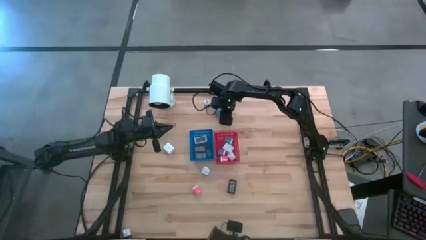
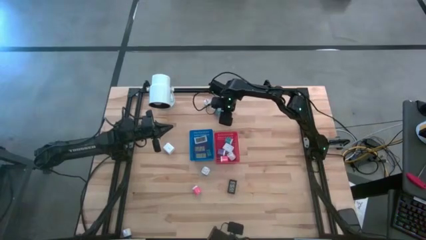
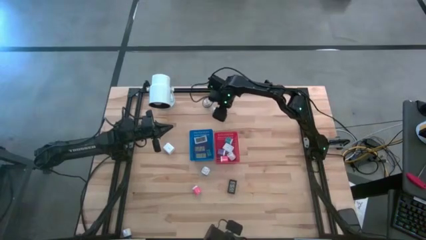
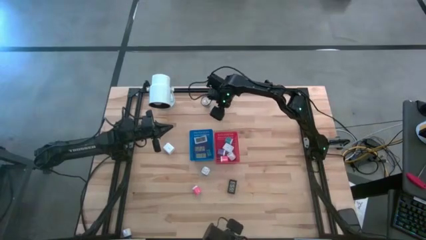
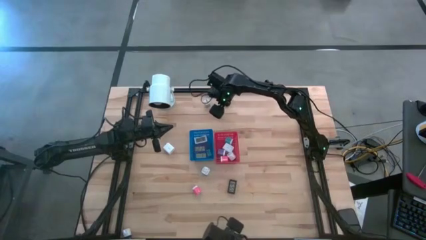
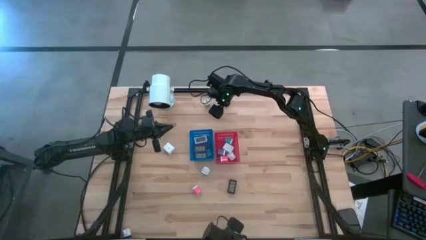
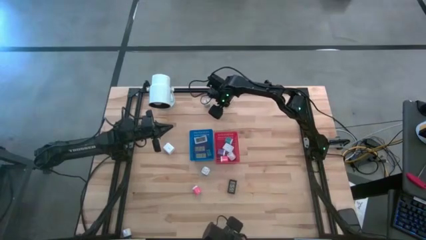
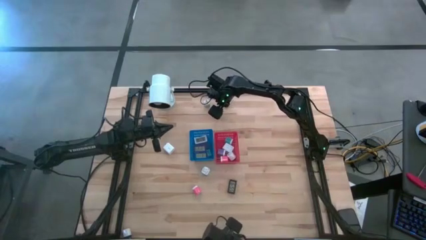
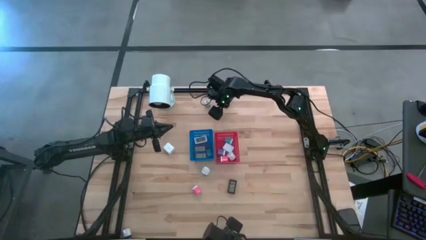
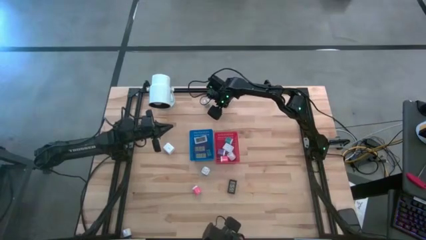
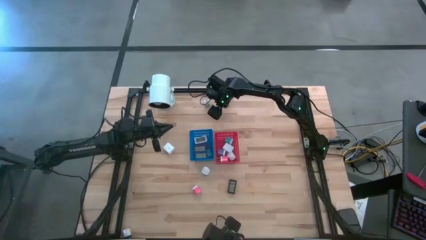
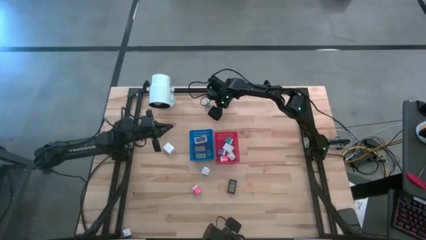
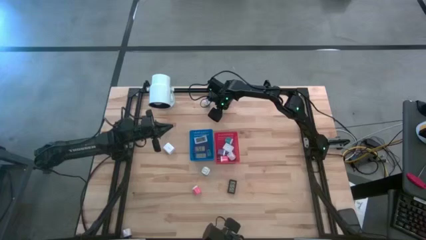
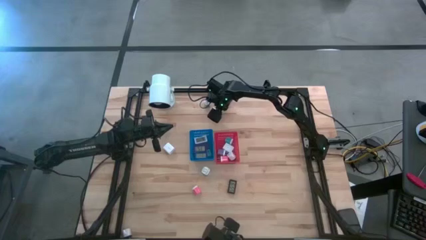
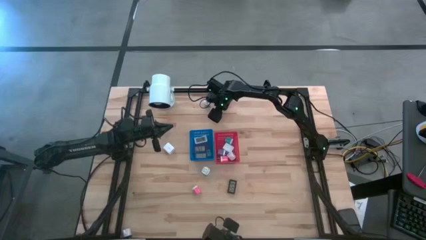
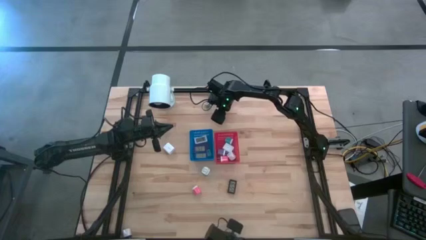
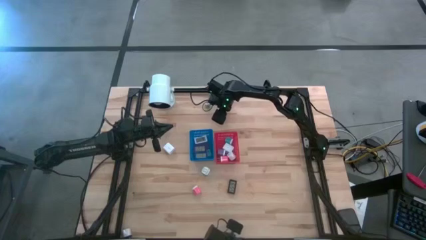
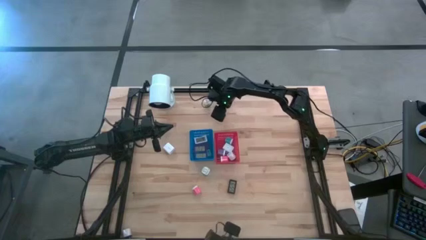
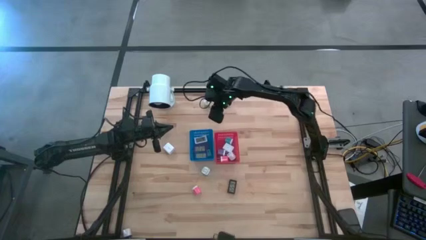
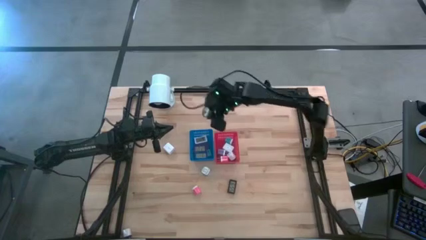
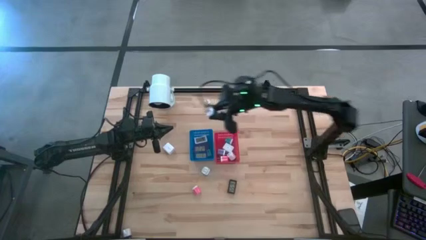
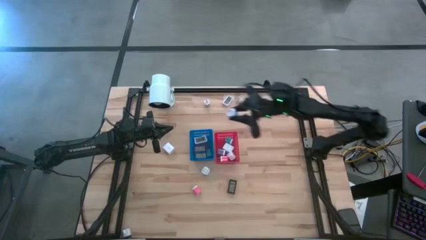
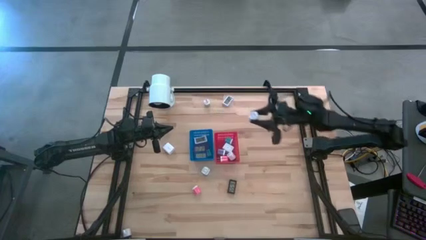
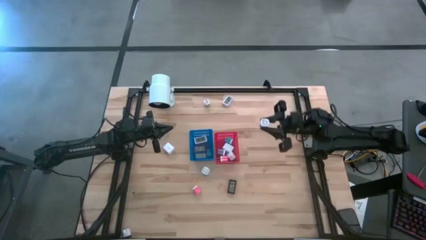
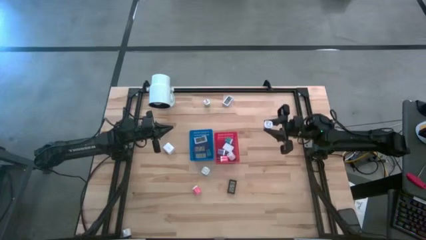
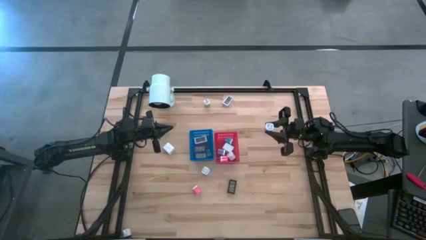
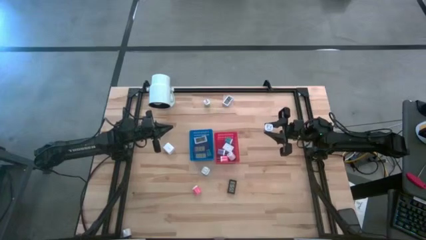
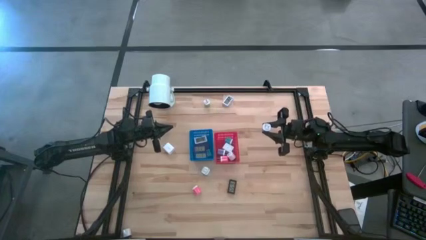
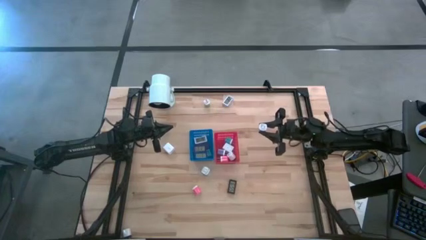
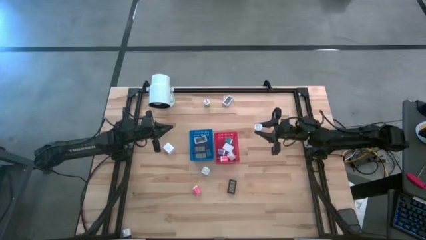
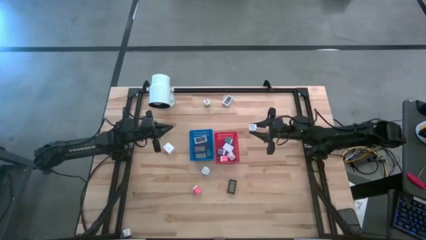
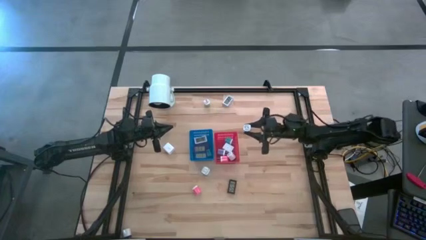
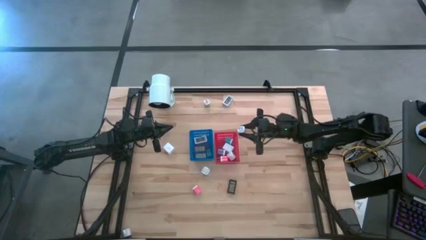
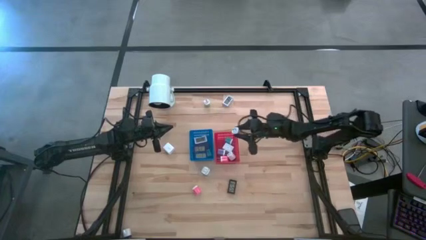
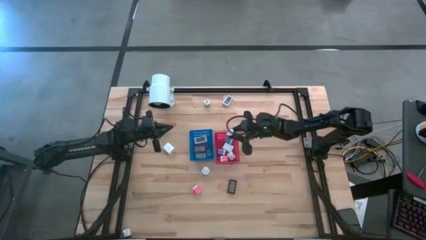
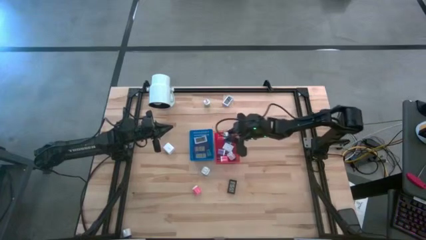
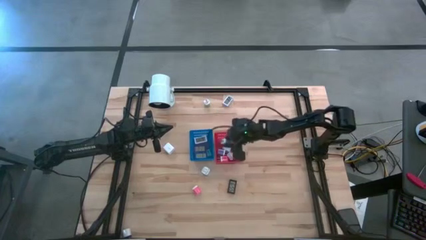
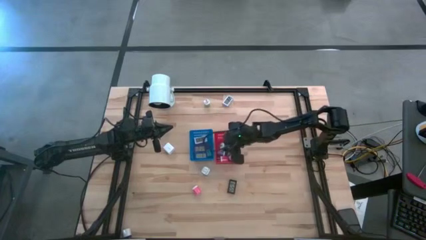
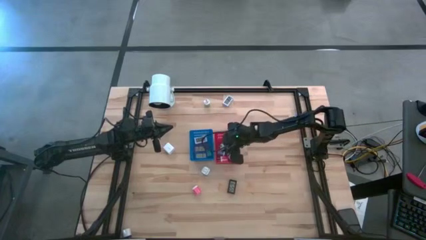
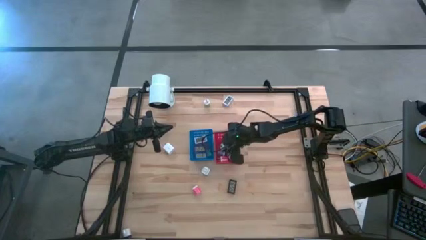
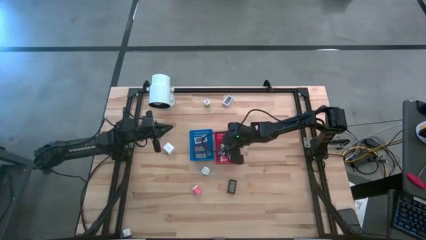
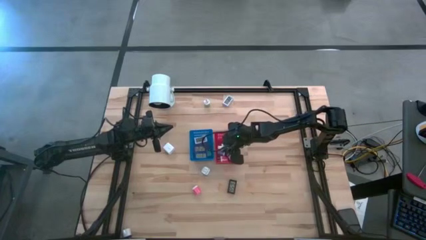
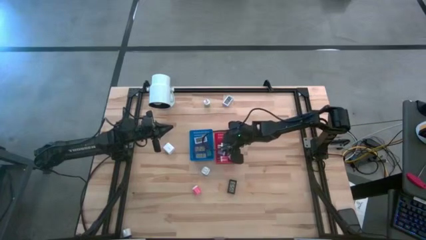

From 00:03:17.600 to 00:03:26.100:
Task: Pick & Place Office items
Put the blue charger adapter into the red bin

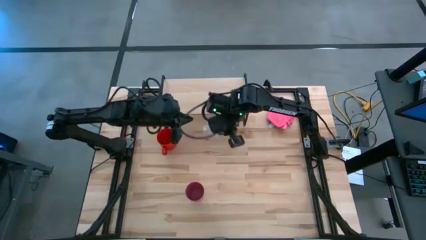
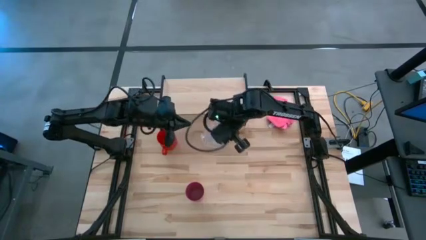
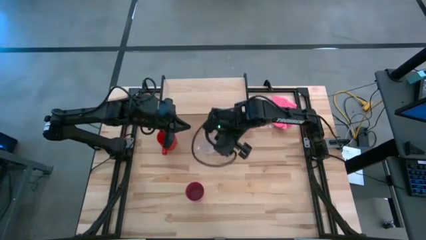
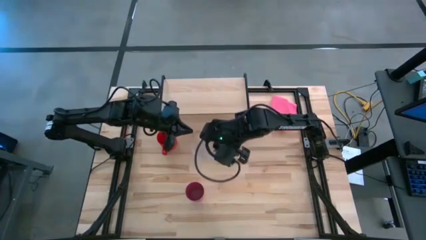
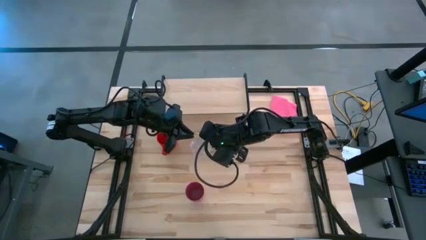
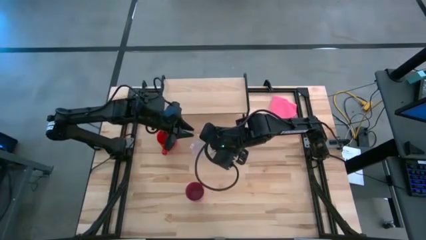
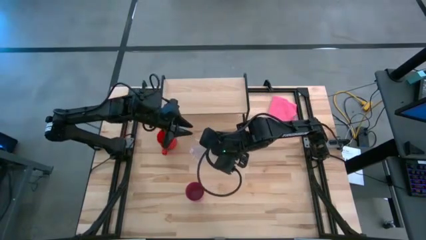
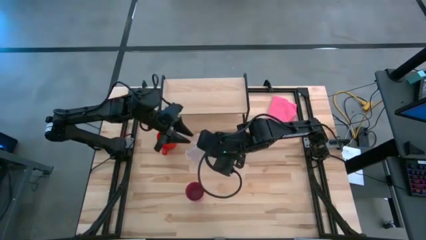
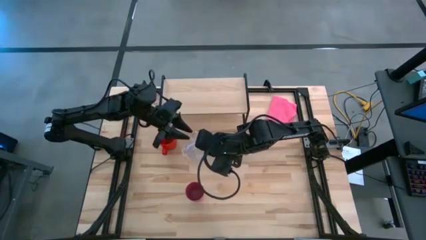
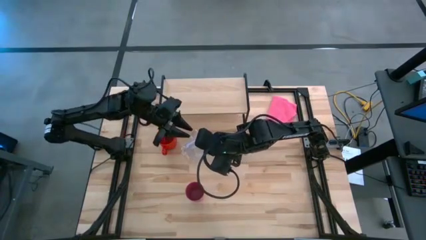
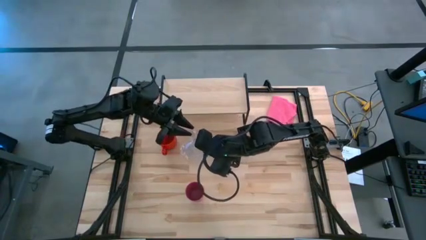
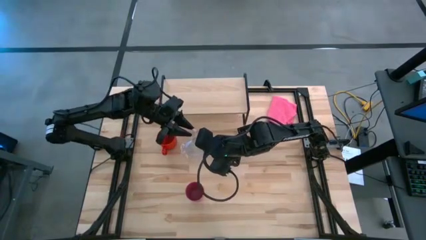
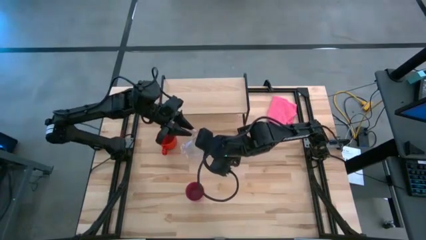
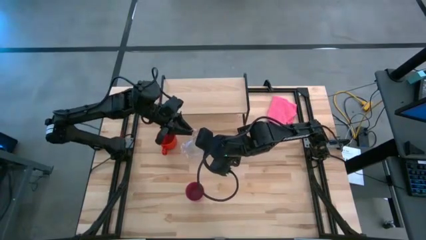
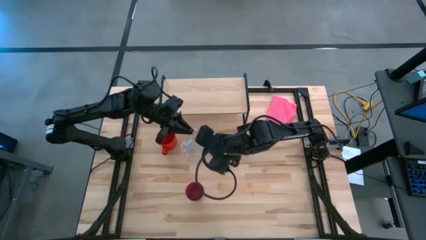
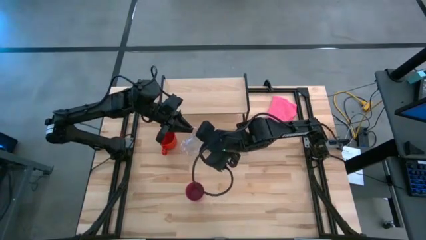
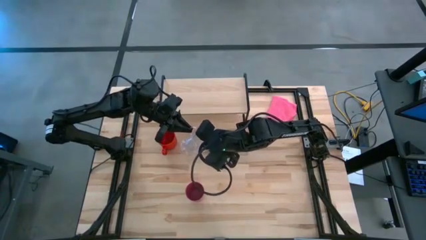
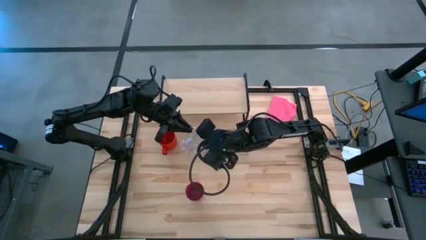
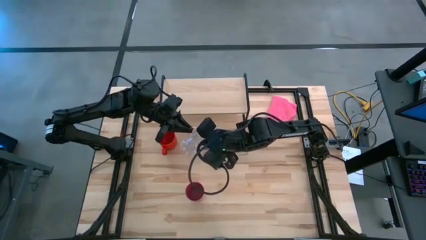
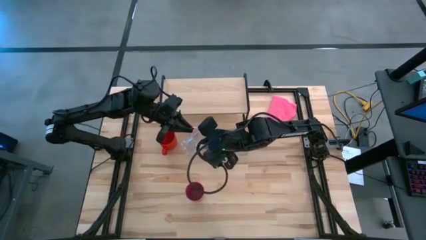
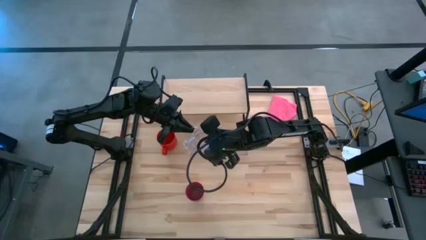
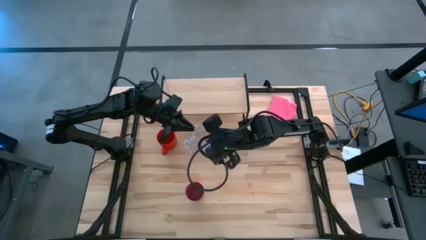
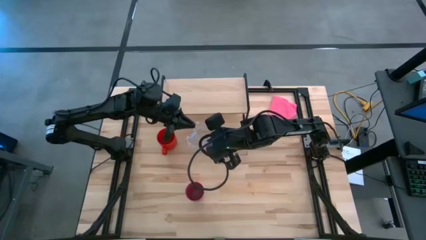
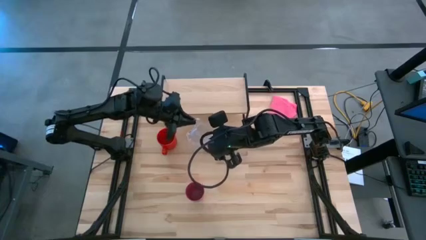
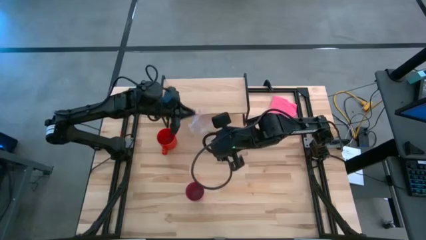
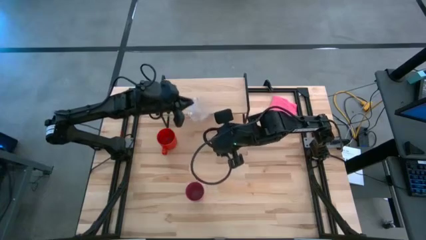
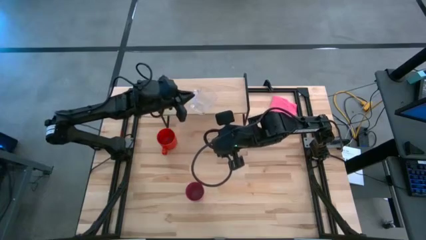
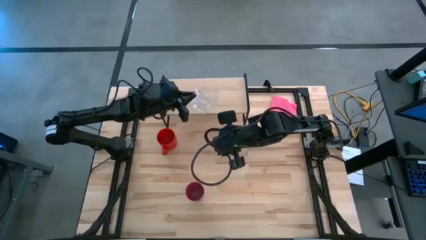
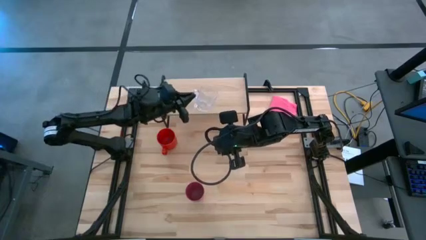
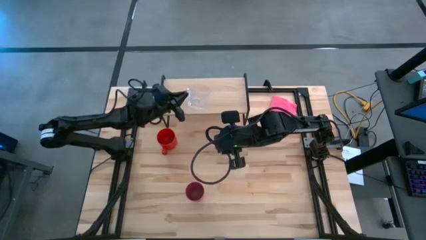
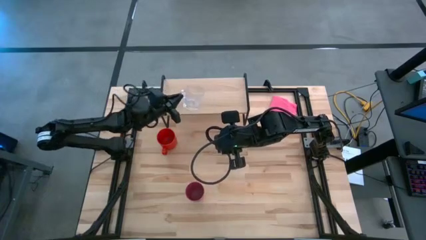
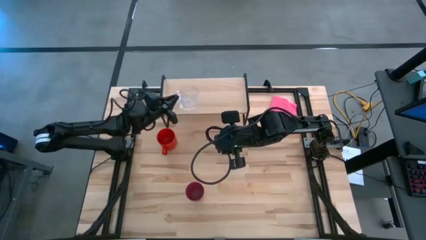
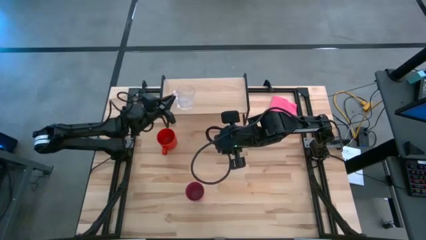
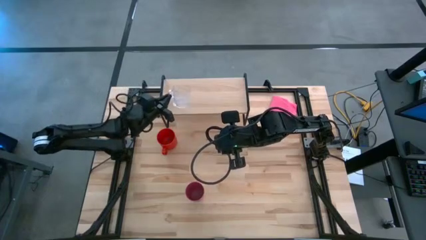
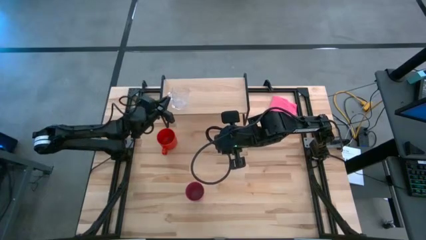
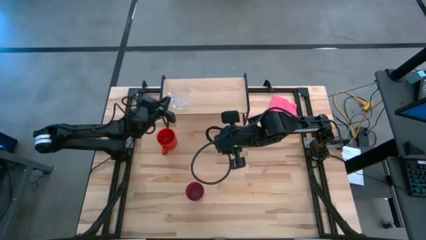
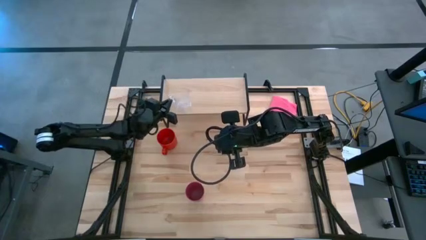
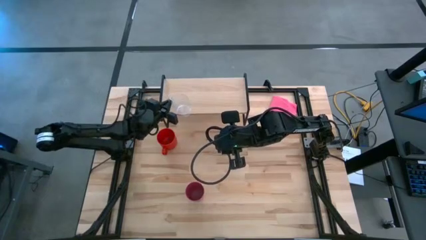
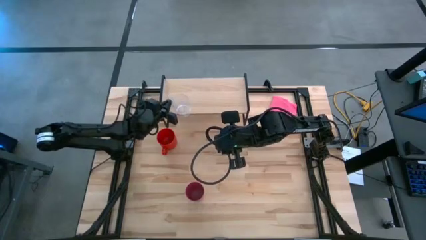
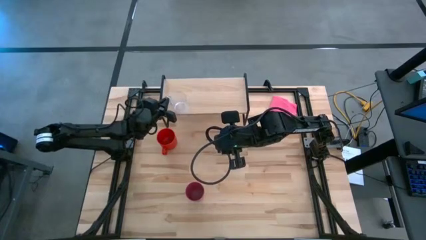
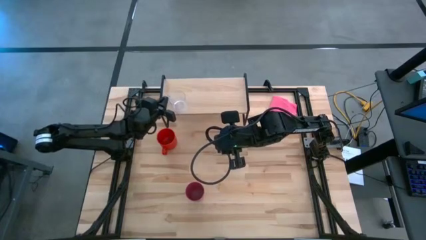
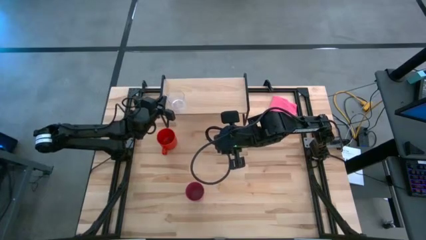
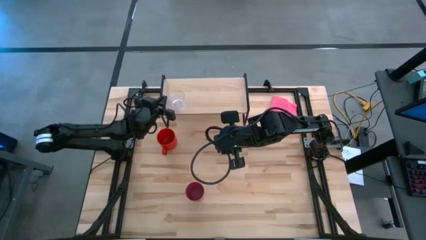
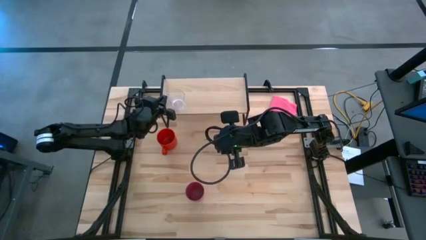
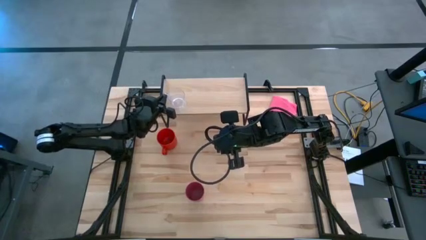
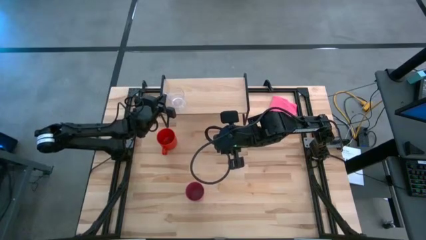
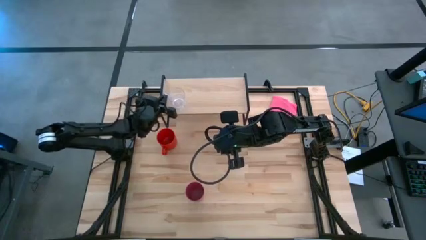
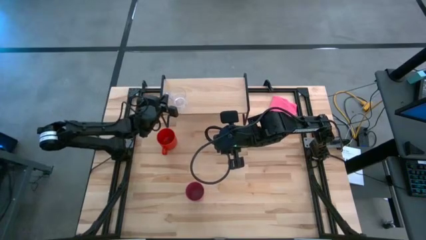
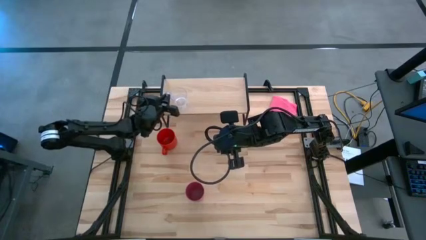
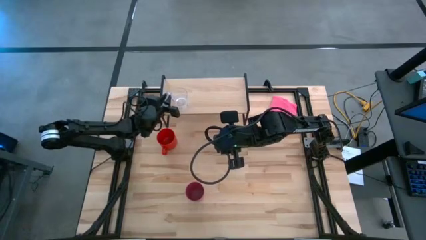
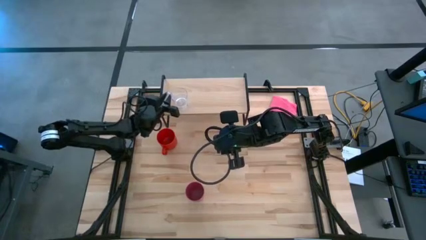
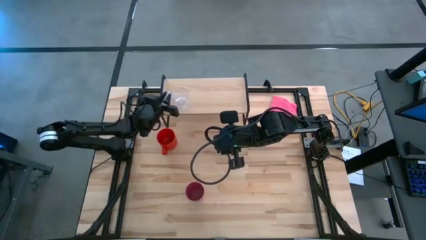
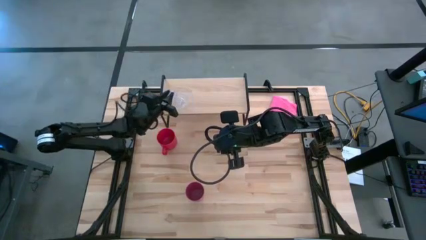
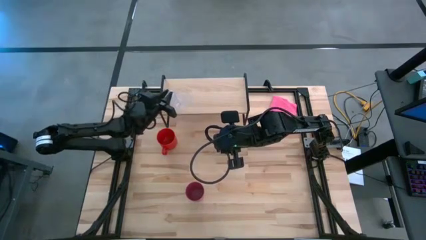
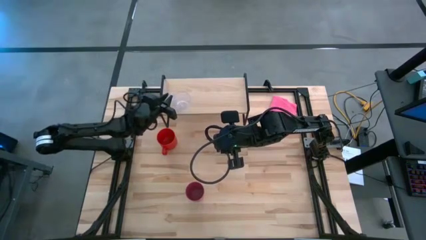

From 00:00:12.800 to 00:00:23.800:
Task: Stack small to large cups/mugs on shelf
Put the transparent mug on the shelf
